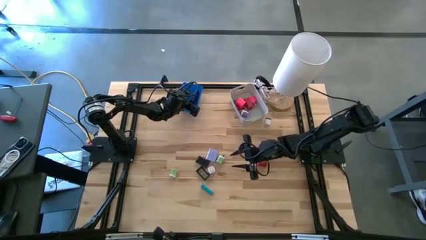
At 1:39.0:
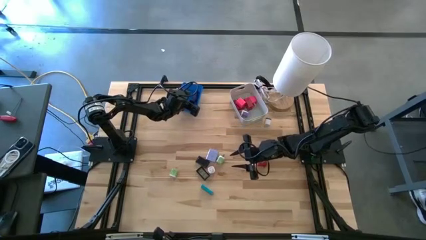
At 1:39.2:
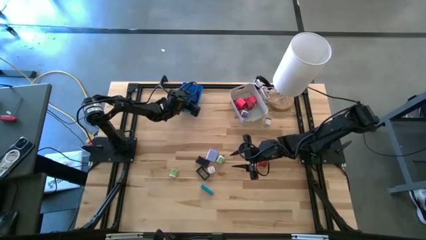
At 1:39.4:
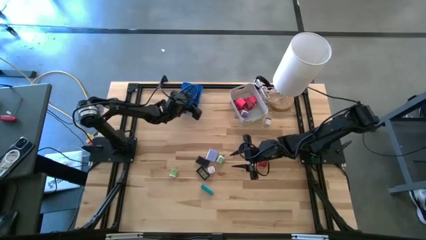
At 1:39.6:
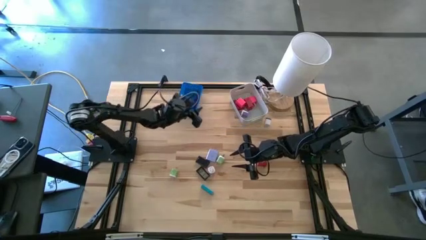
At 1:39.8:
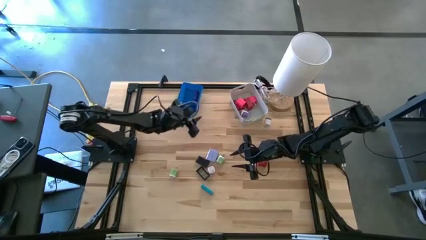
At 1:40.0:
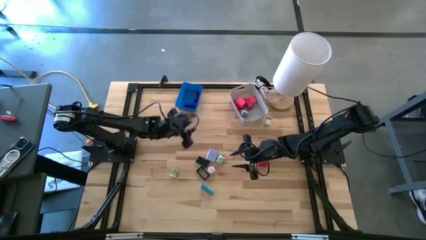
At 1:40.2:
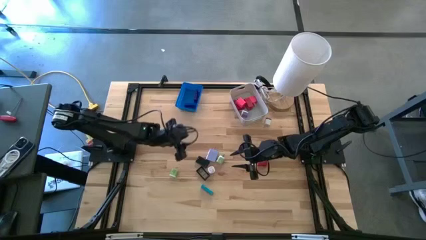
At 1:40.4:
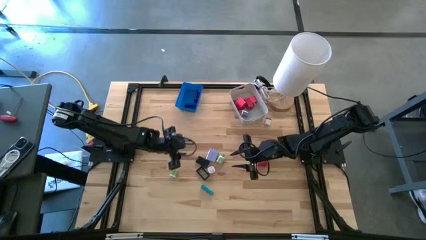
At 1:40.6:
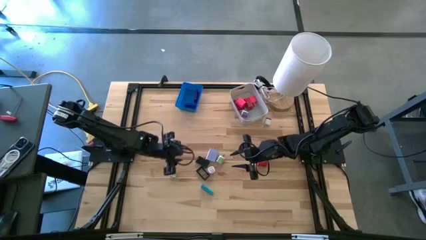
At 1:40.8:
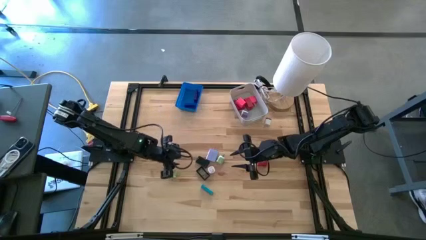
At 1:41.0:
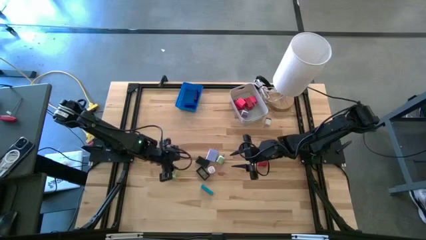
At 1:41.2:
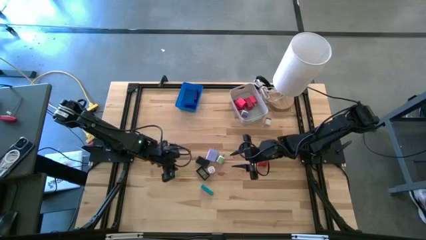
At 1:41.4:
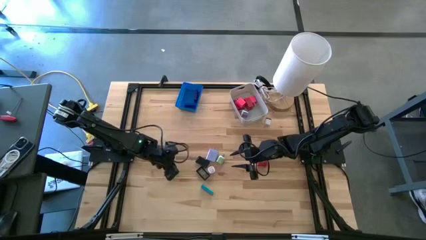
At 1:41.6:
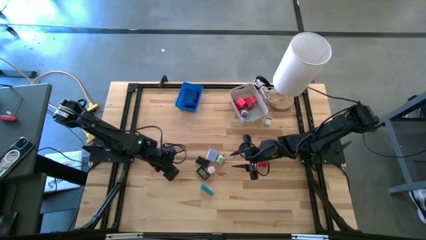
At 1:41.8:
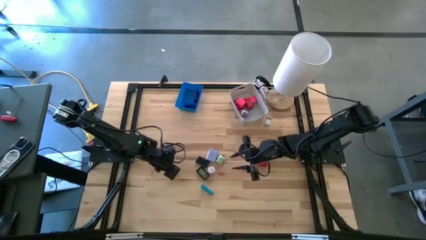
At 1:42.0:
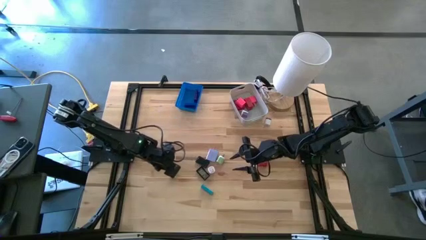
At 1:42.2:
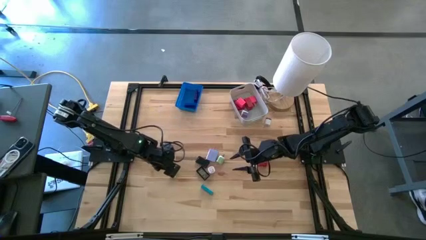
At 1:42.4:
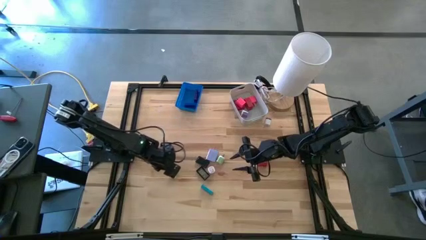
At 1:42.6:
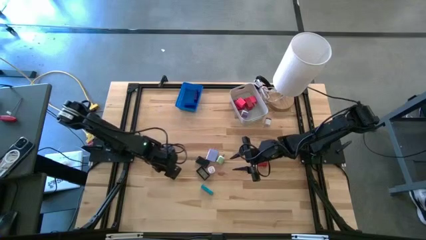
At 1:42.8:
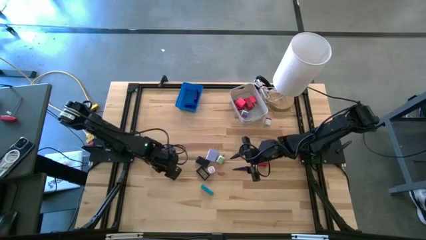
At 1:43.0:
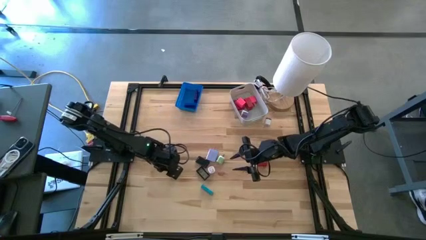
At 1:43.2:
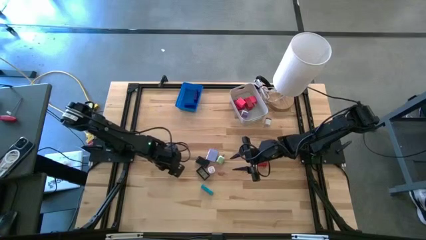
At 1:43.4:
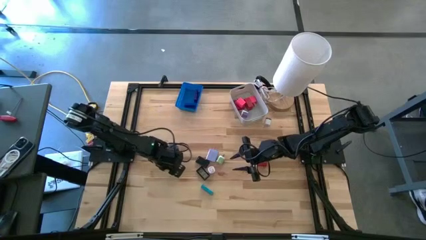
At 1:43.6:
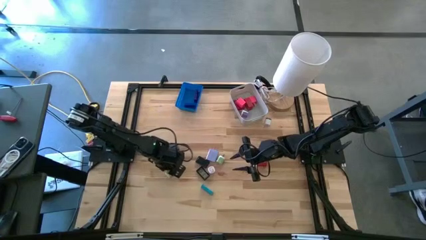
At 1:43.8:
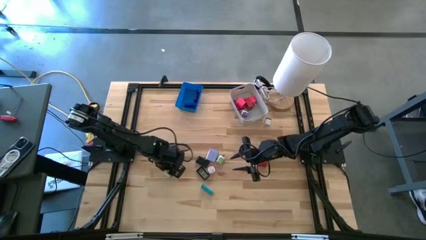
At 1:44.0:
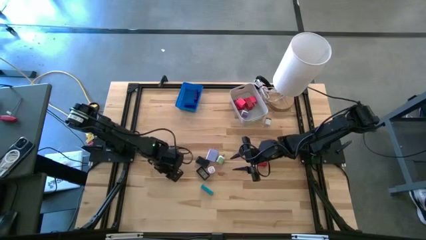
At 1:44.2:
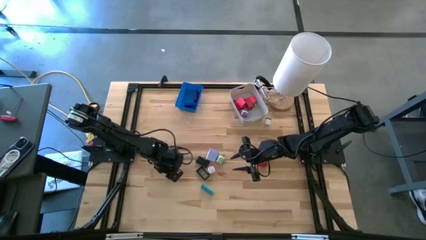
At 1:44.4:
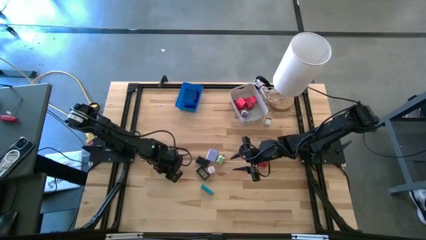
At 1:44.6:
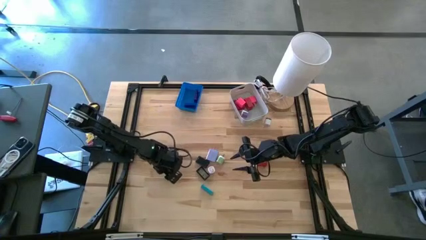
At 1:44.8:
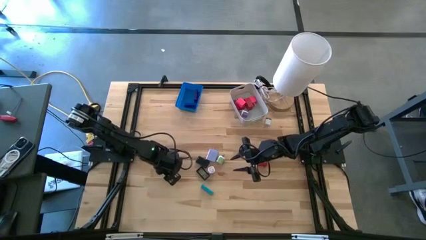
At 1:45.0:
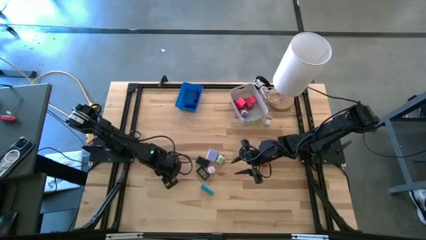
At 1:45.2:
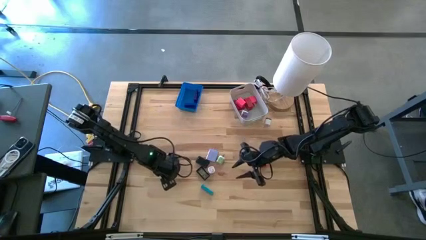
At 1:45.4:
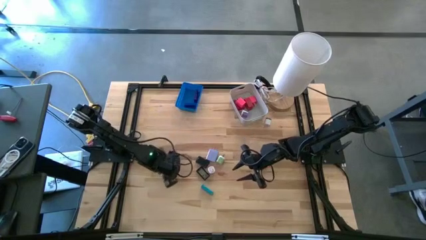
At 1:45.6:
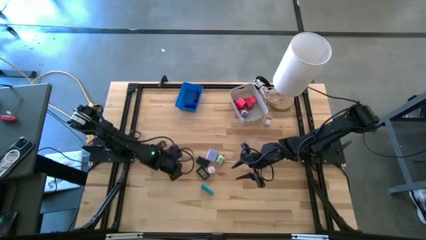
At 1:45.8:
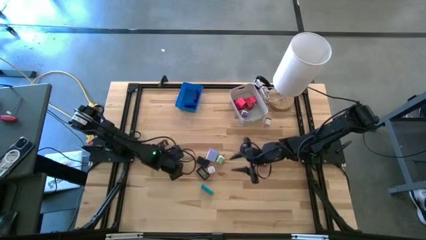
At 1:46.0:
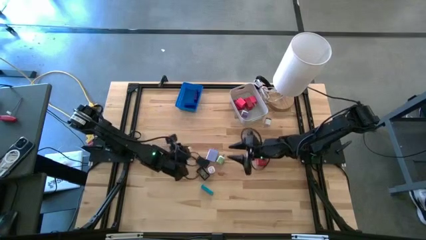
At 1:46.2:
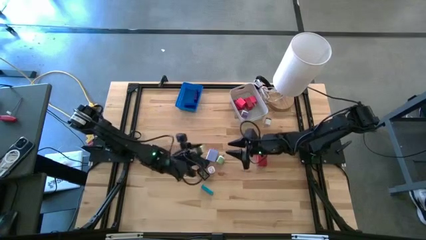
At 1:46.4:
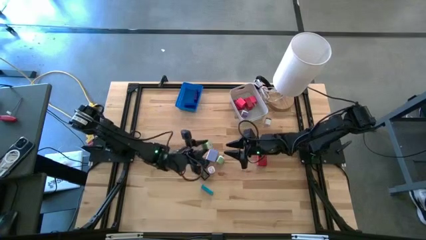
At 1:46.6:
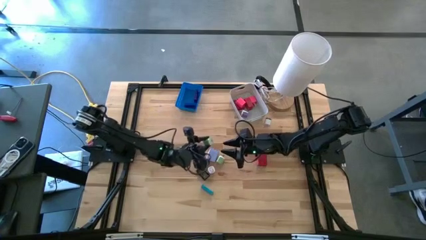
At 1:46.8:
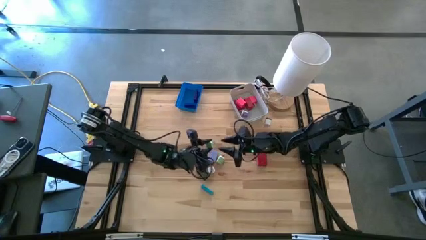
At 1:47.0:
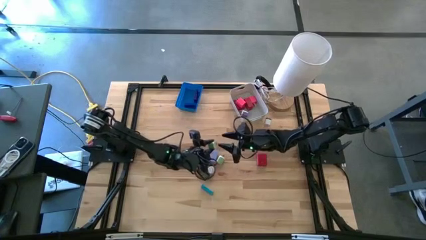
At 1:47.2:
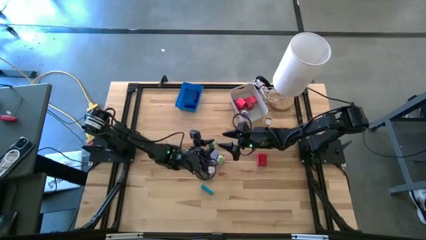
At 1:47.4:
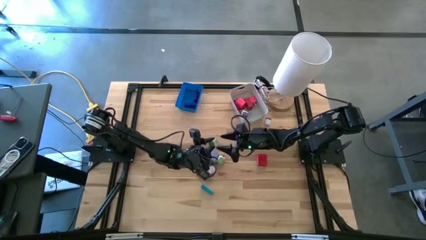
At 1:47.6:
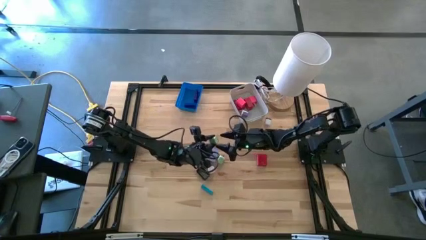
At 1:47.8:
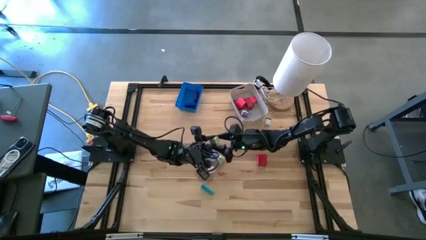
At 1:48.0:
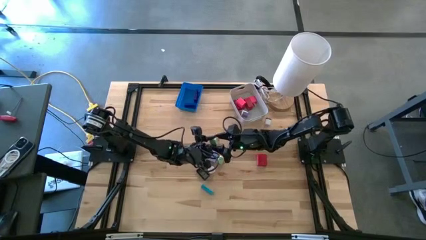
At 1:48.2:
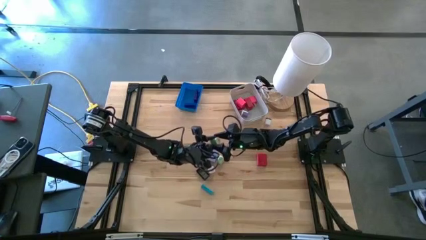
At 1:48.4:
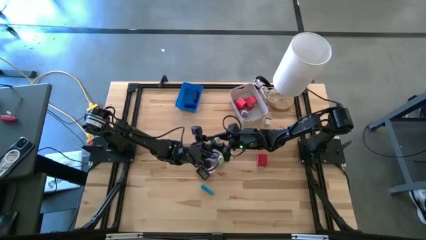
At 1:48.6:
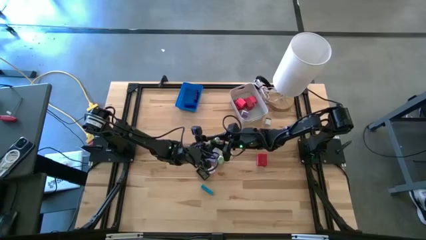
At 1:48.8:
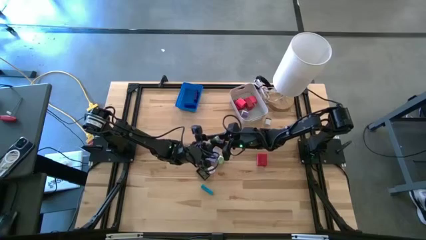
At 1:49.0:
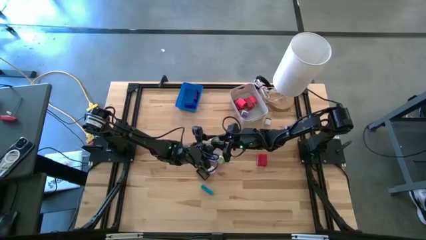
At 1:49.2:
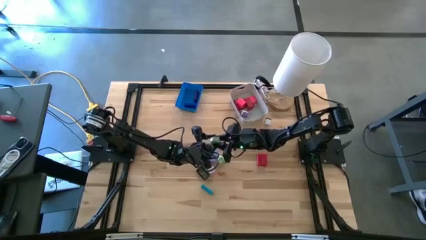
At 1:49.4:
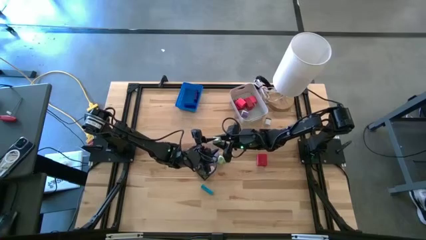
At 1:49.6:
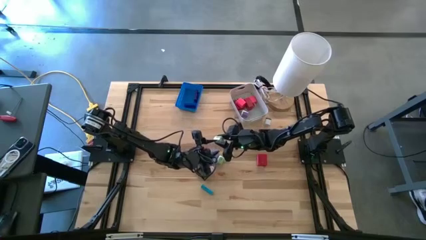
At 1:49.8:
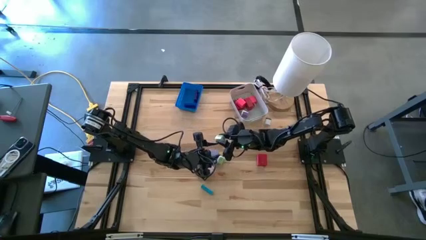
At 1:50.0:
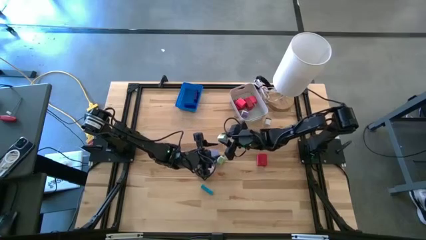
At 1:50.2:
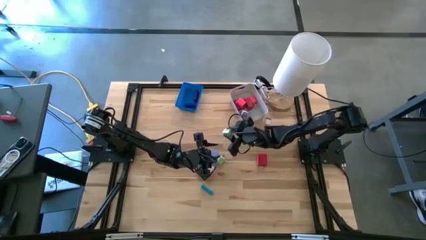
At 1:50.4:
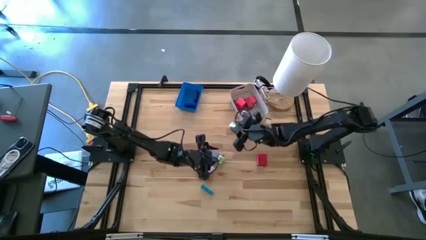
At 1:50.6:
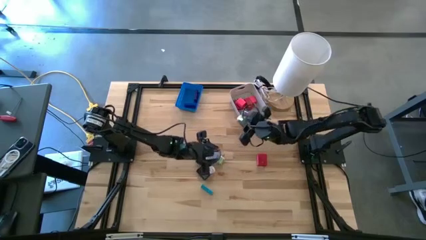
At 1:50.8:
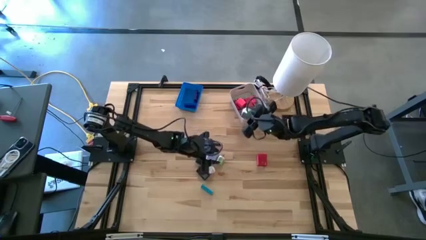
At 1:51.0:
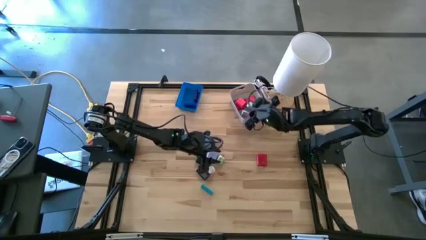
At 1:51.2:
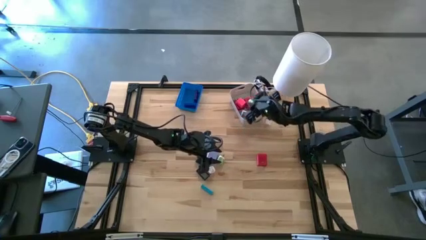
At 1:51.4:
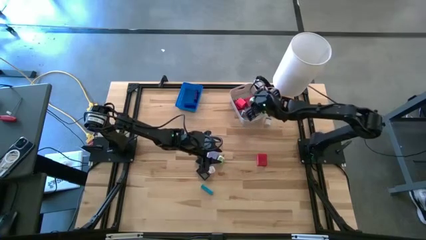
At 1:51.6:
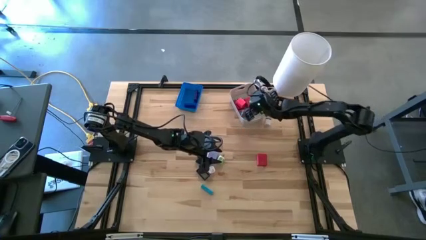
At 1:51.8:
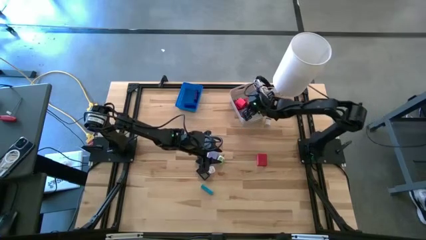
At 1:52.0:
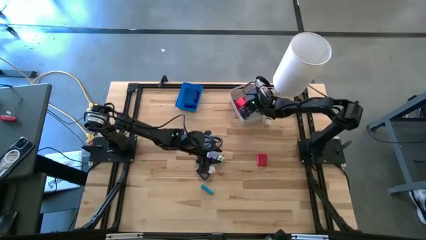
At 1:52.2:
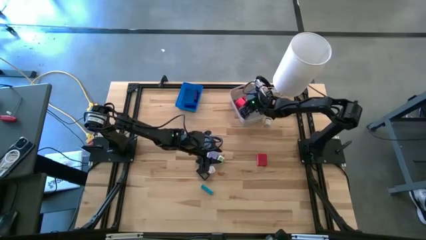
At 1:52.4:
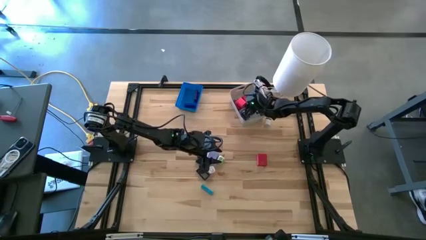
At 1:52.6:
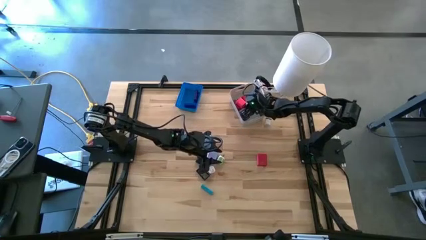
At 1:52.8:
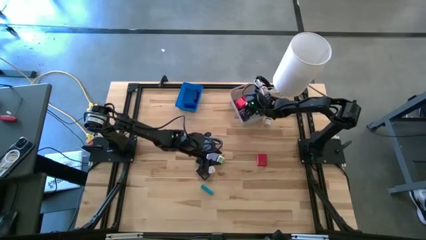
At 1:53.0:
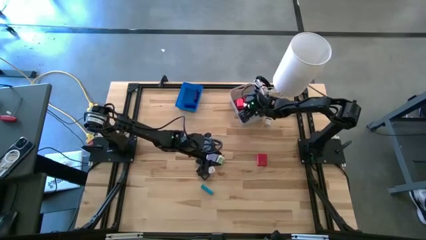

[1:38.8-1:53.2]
Task: Pick & Place Office items
Put the left green charger adapter into the white bin
